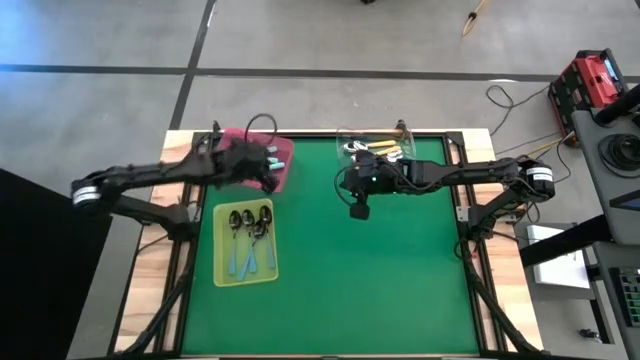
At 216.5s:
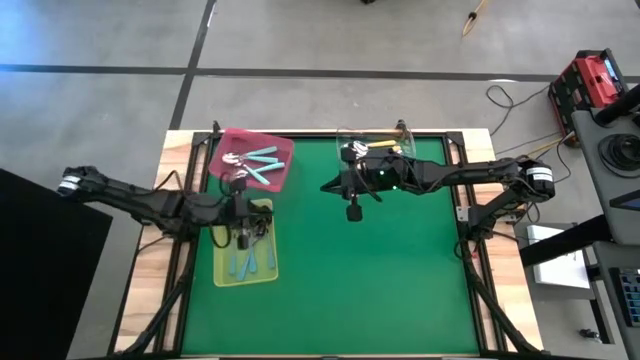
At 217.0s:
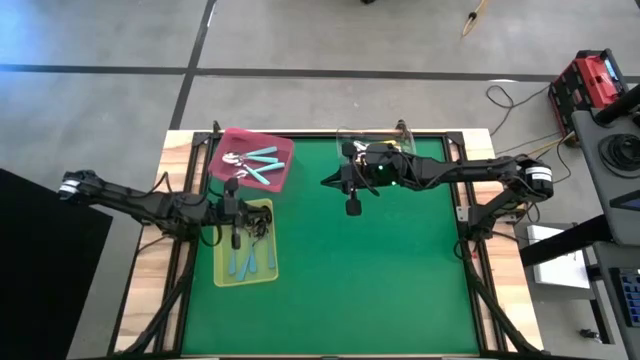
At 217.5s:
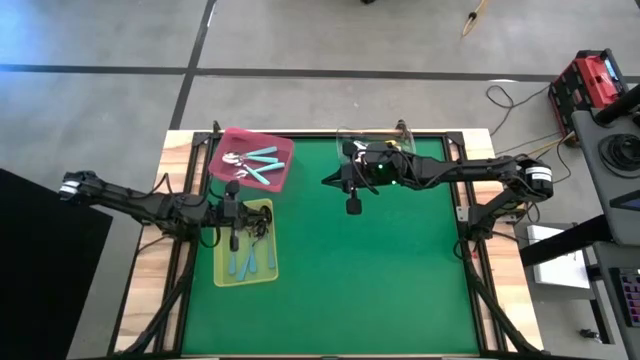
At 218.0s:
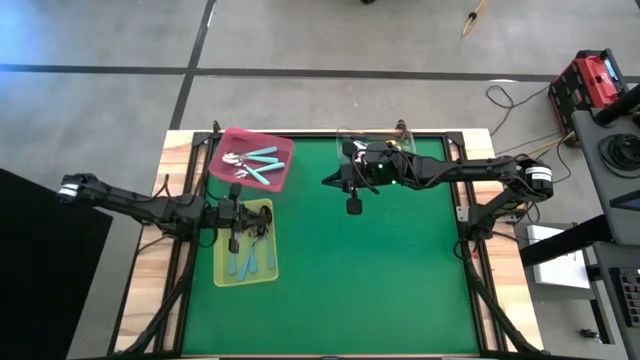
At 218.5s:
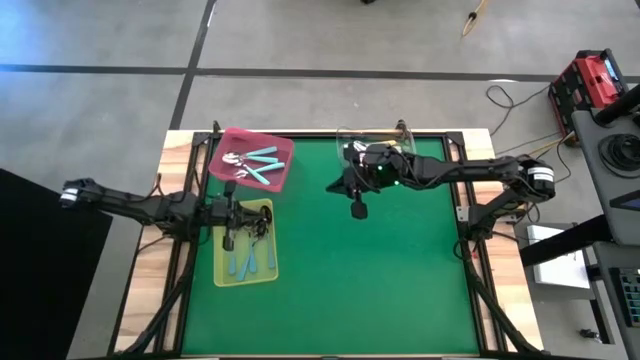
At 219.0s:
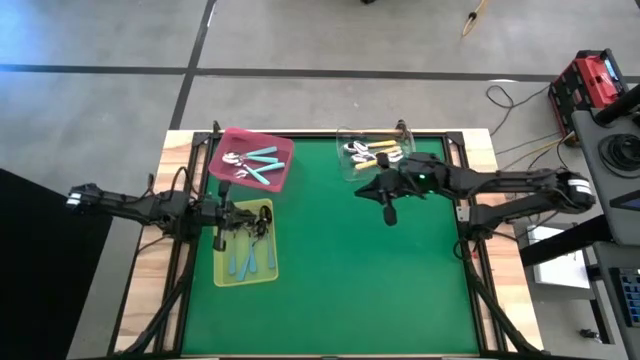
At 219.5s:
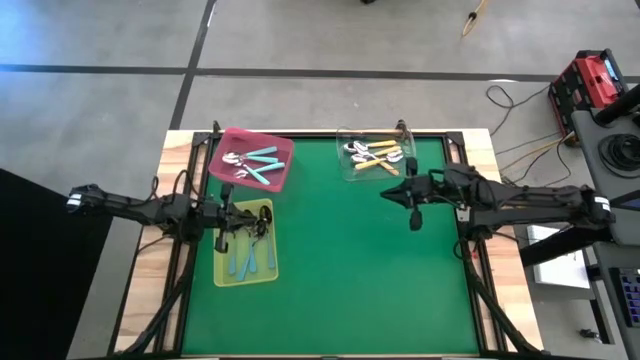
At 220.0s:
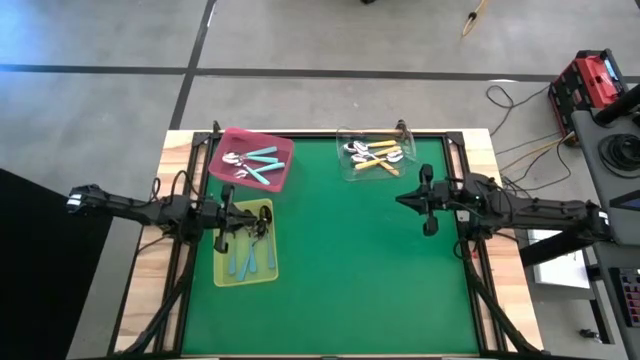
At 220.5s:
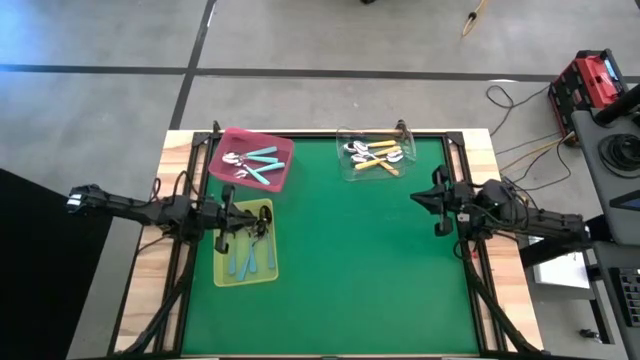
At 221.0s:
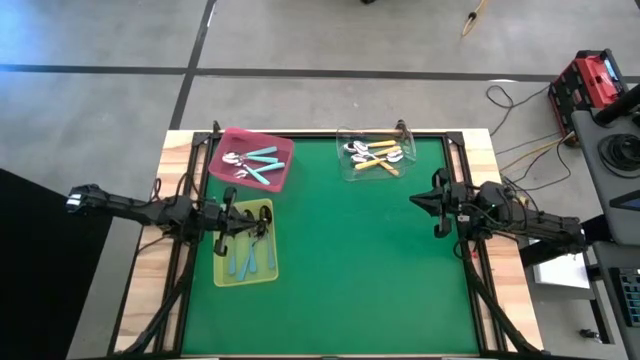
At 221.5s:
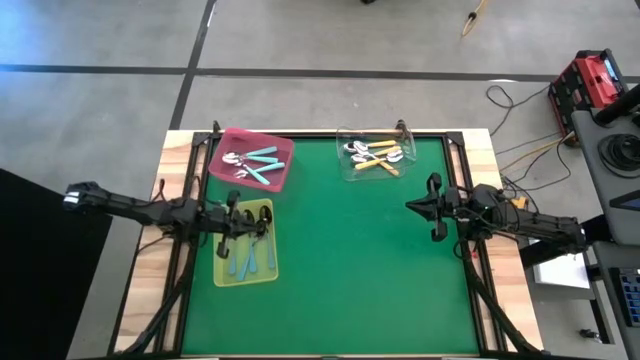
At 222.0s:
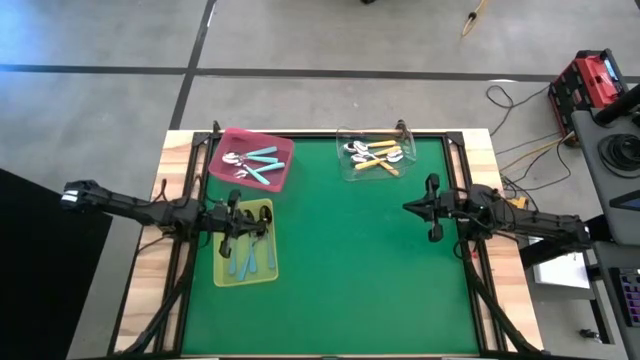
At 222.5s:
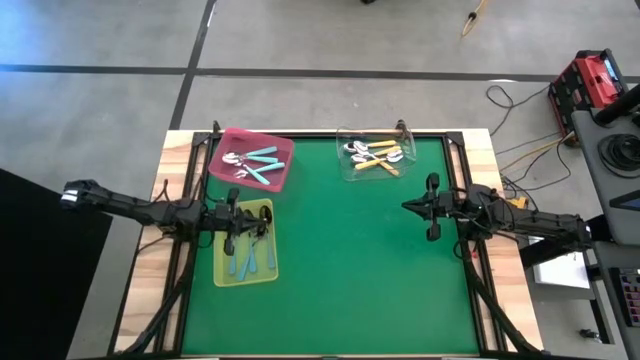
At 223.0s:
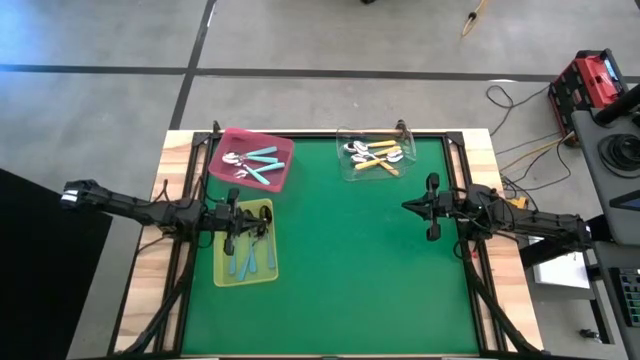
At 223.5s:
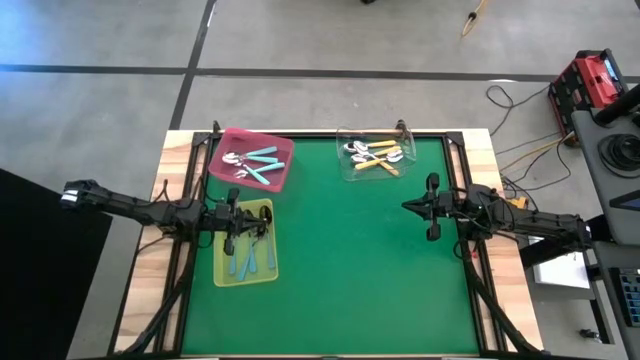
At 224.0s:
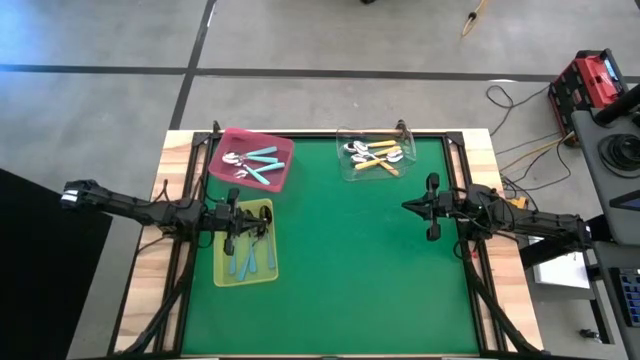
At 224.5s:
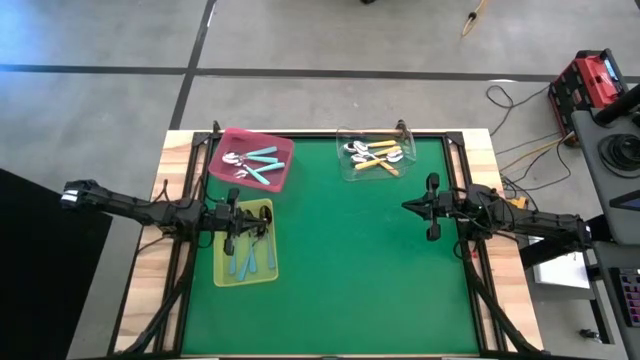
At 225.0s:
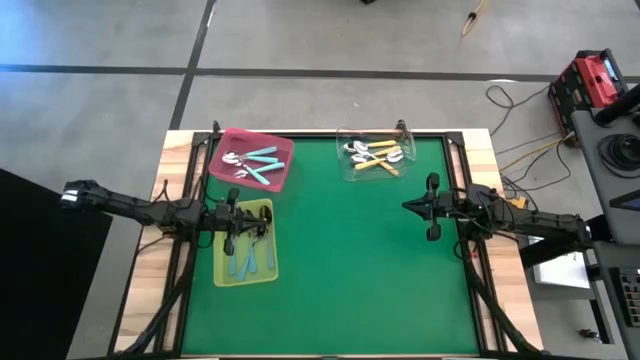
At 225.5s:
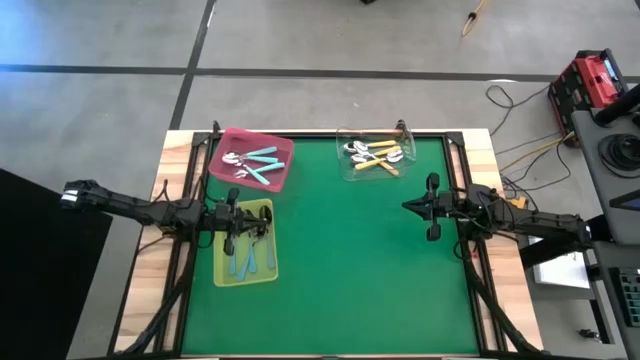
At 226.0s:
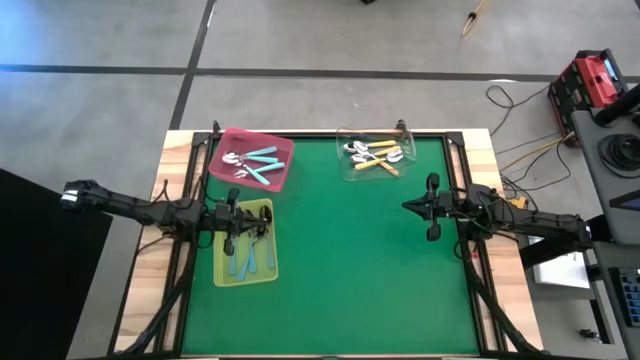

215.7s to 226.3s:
Task: Sort silverware by color (type)
Return to Home Position

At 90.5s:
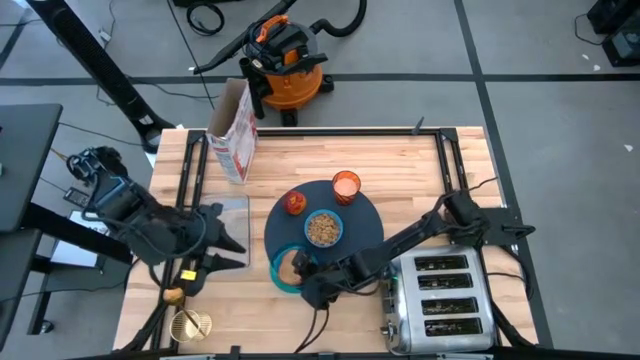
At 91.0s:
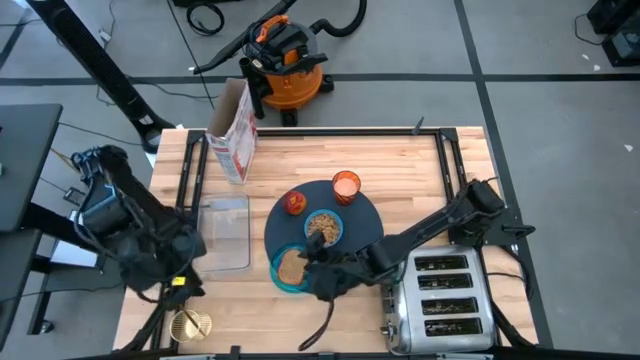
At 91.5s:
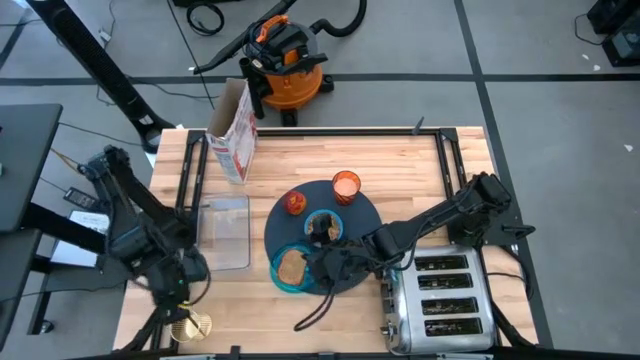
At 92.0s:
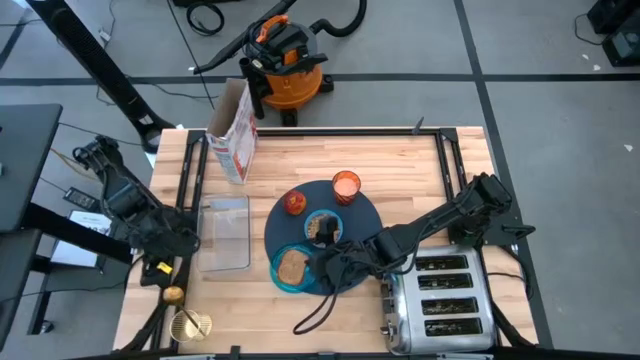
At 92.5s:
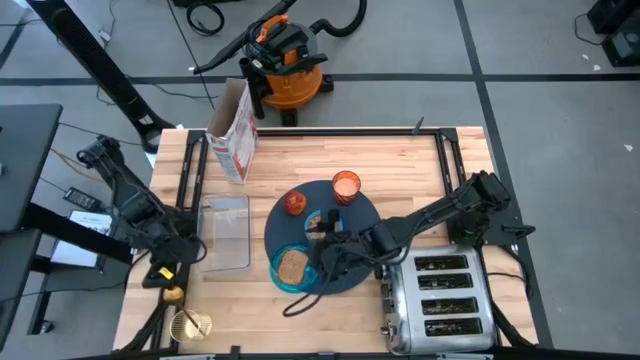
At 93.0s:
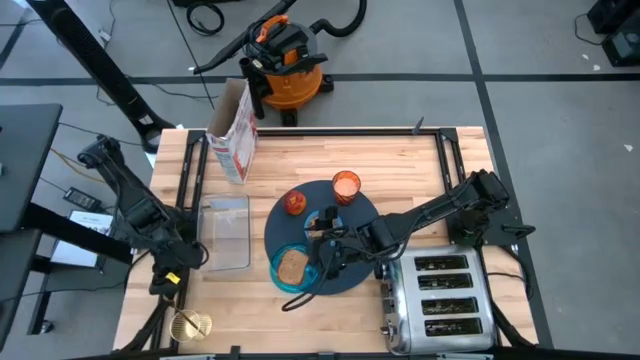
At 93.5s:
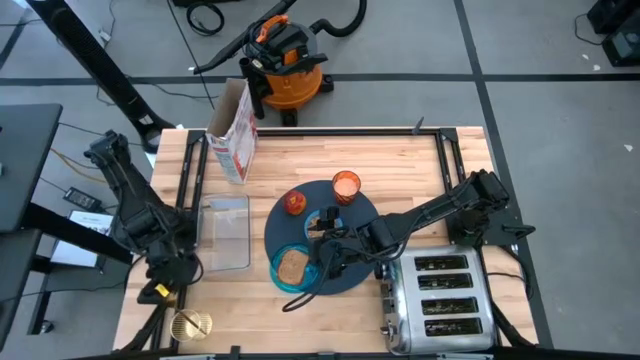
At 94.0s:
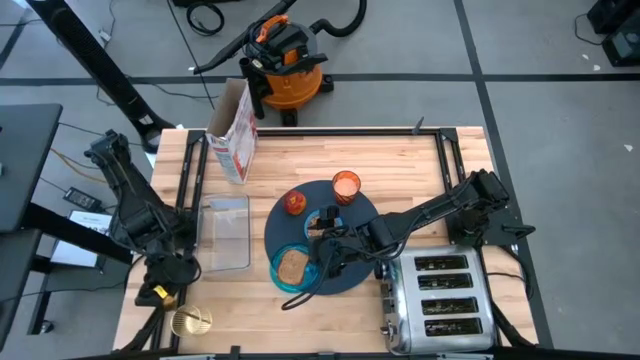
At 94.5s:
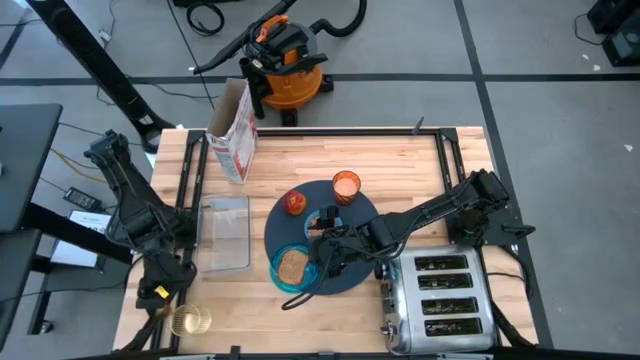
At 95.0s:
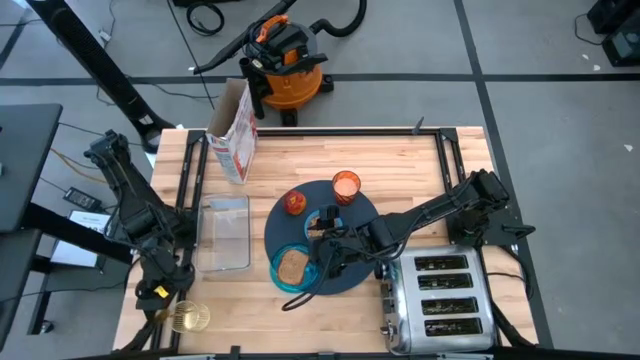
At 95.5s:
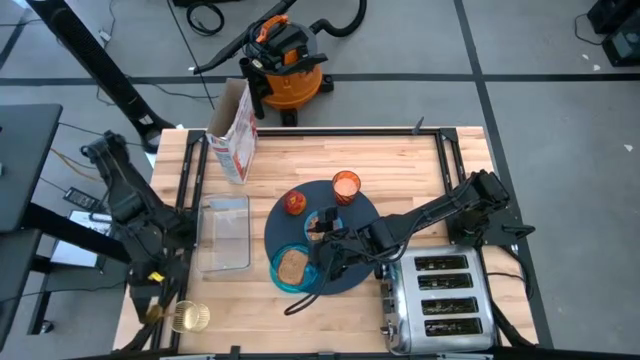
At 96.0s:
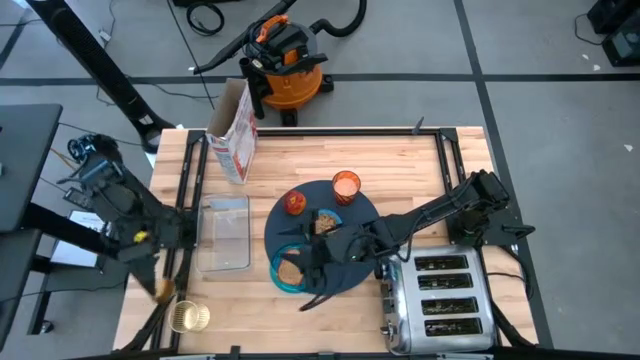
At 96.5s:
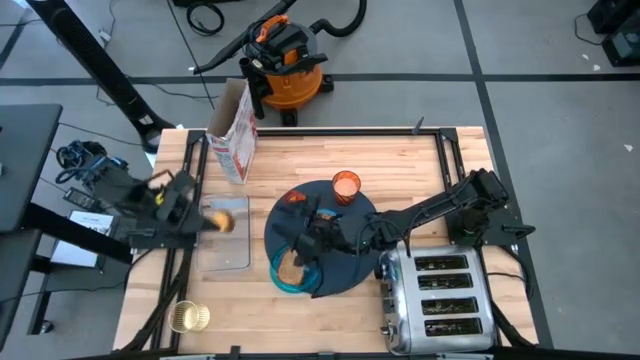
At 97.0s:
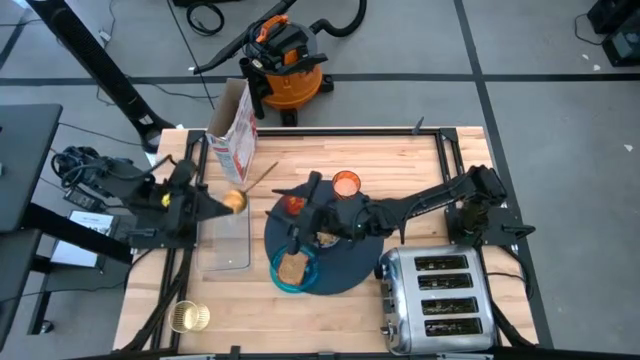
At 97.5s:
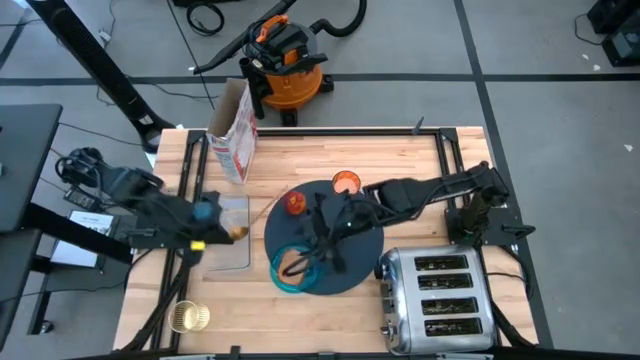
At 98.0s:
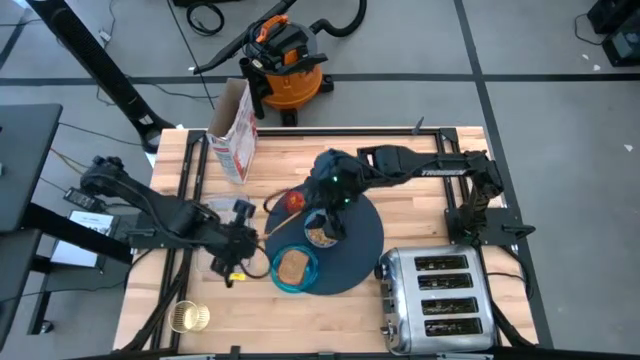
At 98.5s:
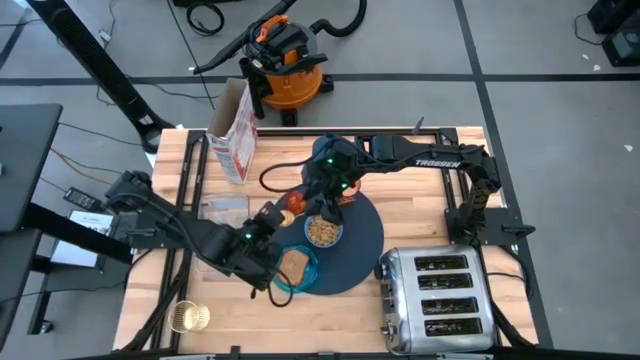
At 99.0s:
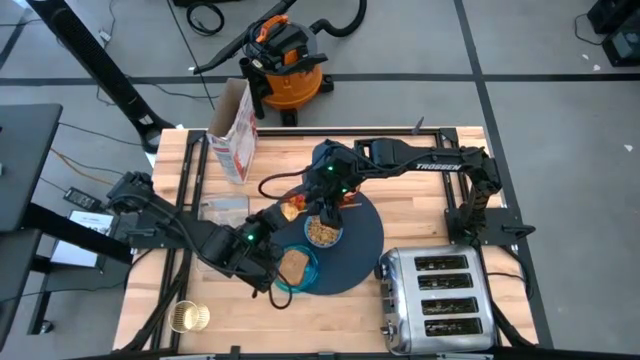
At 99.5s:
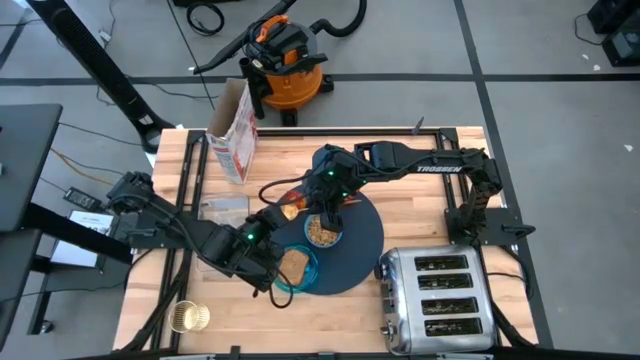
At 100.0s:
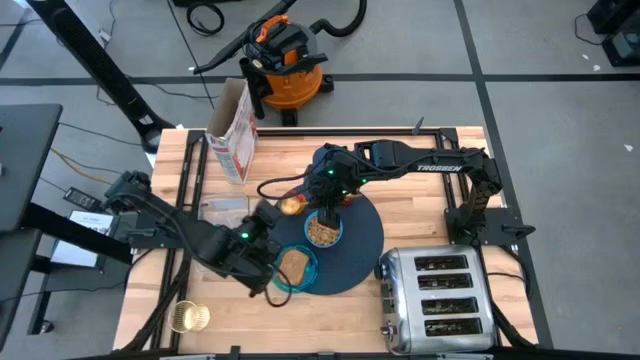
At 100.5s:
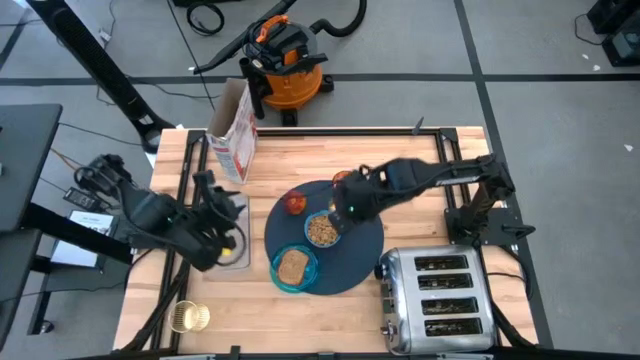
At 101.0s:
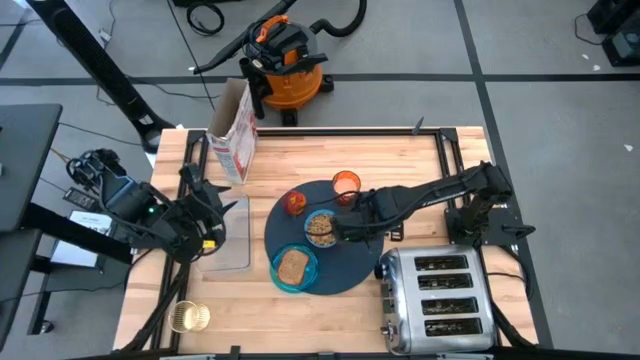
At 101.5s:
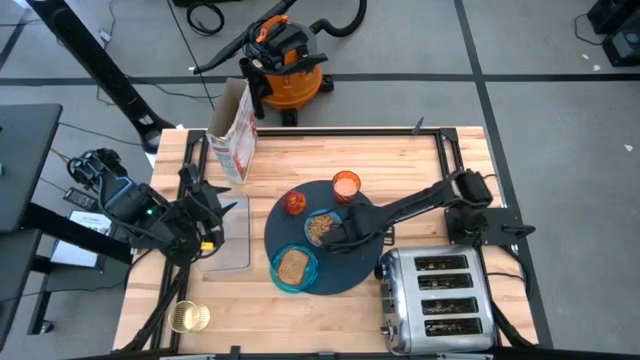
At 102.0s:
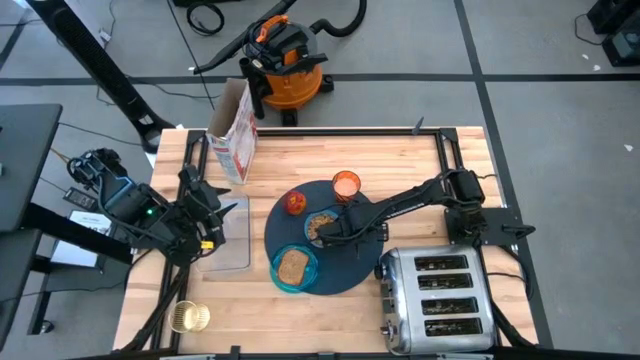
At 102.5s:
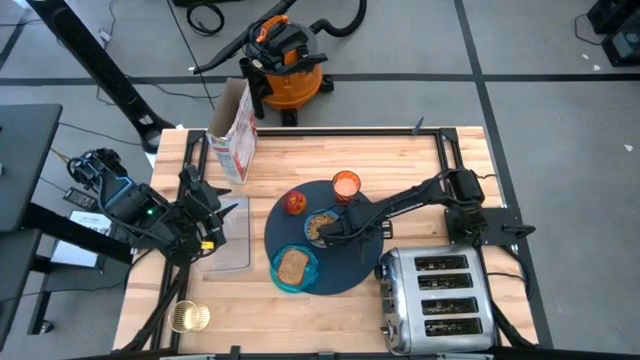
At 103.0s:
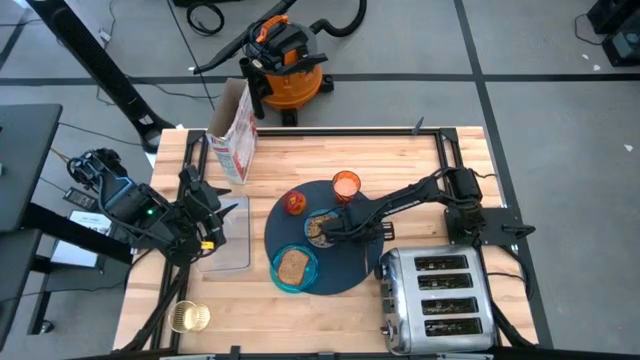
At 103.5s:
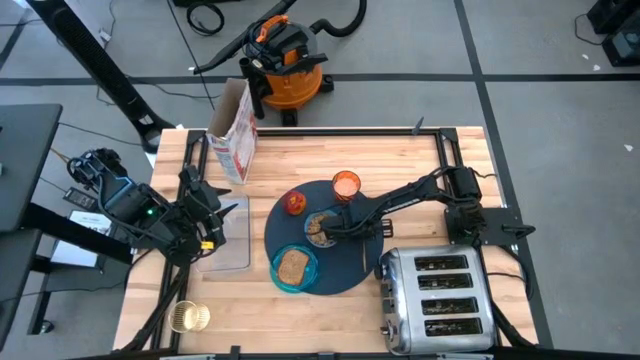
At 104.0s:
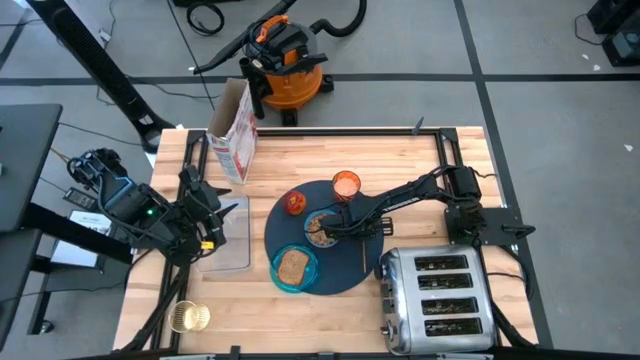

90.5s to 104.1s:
Task: Arrange a breakfast setting
Put the gold spoon on the blue tablemat right beside the blue bowl
